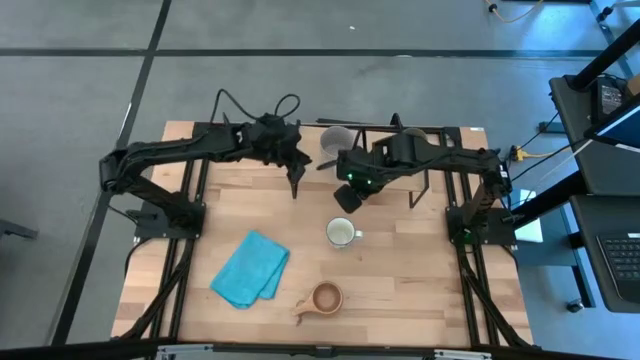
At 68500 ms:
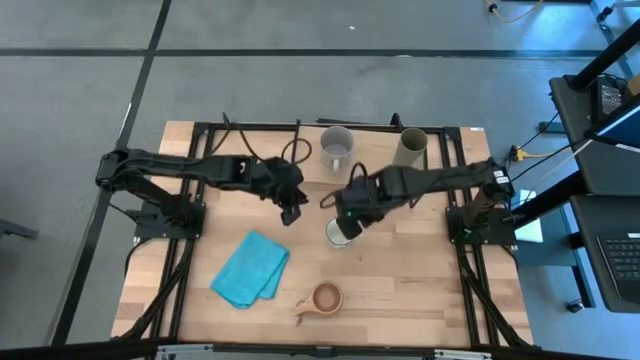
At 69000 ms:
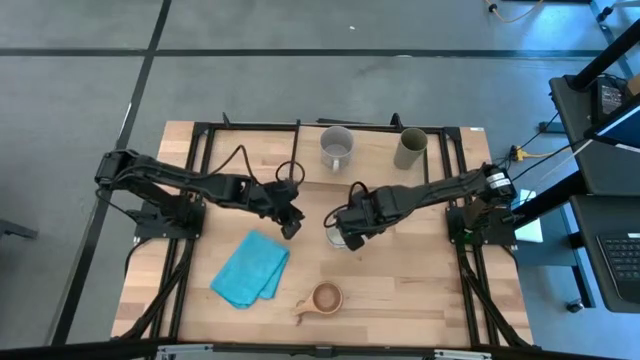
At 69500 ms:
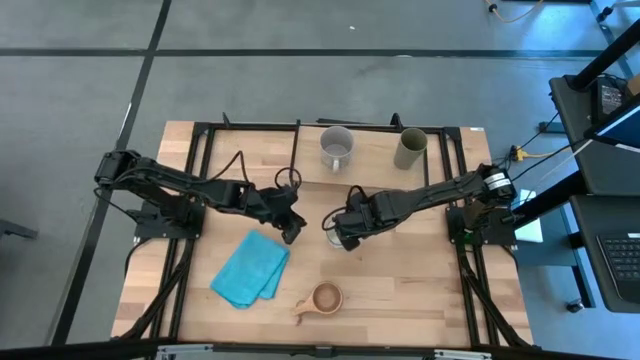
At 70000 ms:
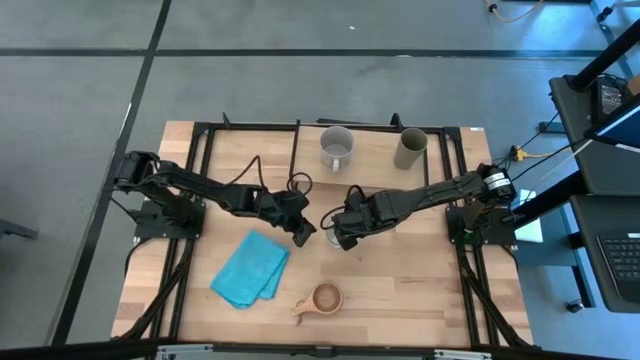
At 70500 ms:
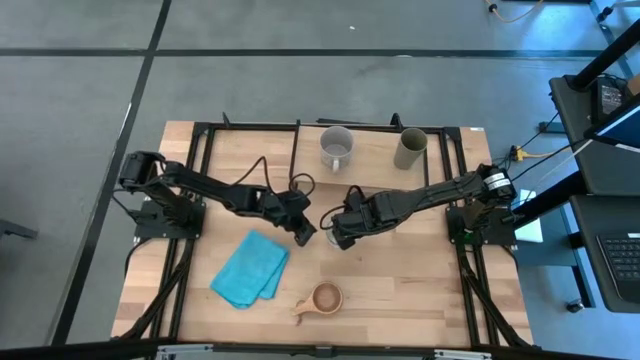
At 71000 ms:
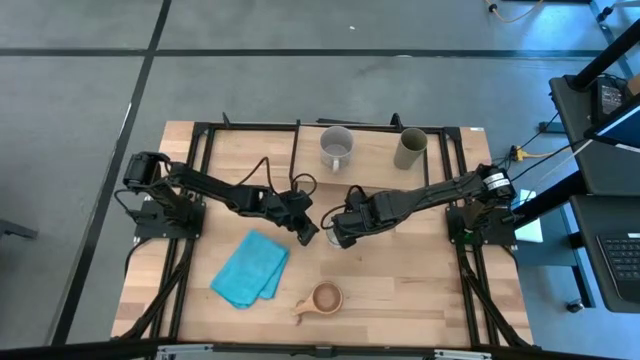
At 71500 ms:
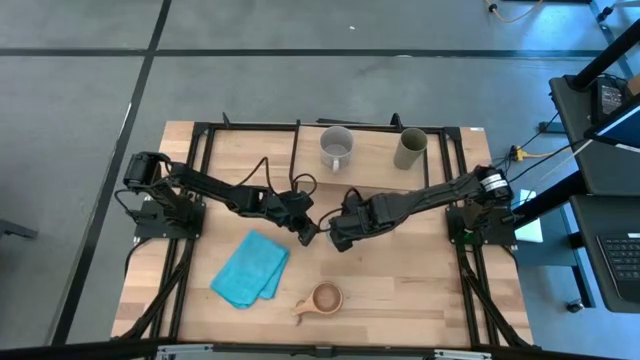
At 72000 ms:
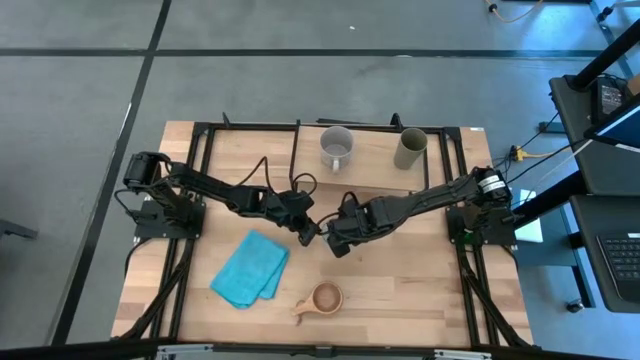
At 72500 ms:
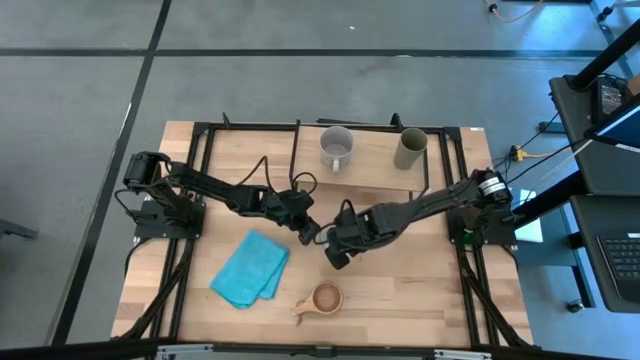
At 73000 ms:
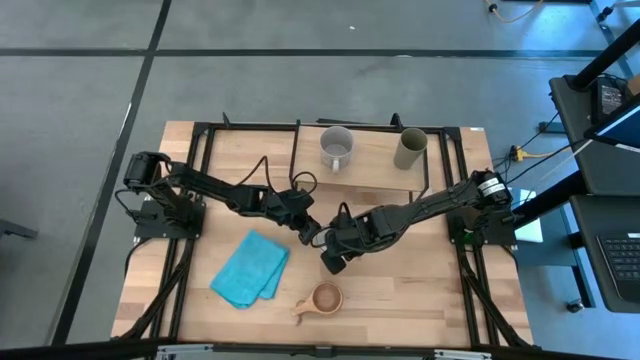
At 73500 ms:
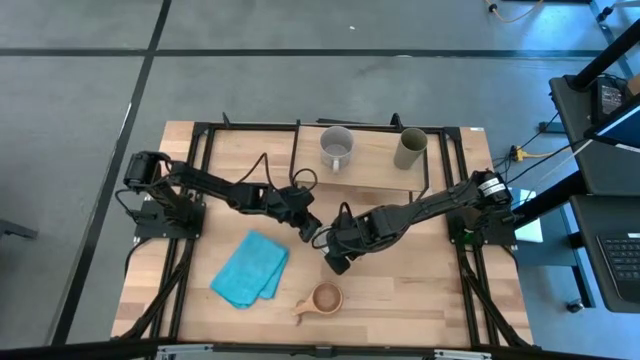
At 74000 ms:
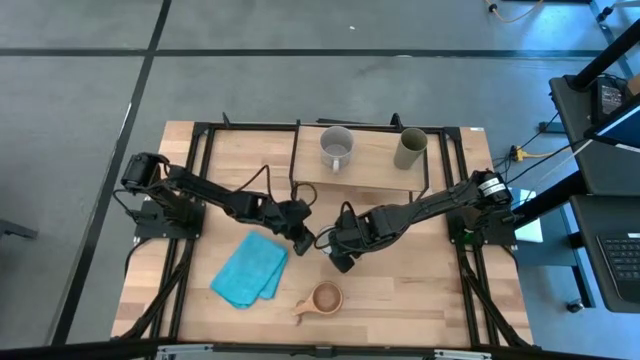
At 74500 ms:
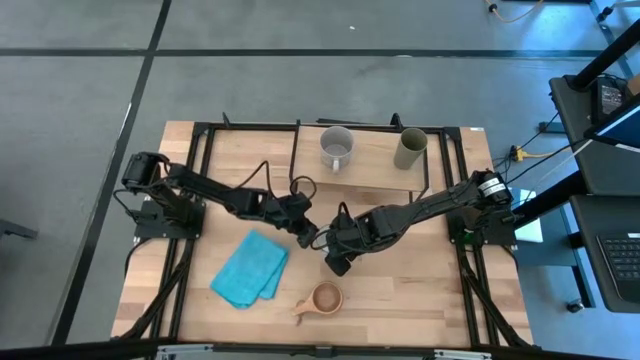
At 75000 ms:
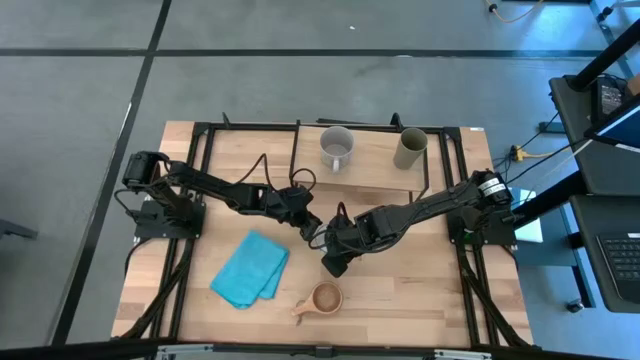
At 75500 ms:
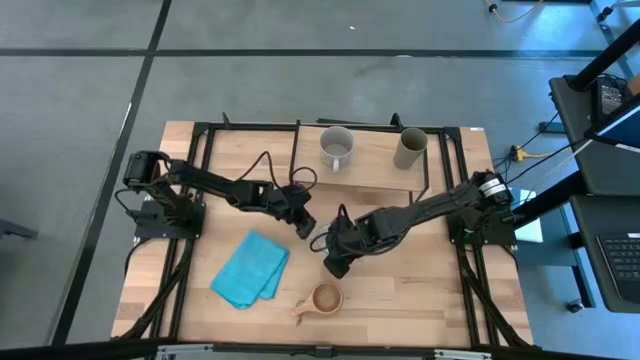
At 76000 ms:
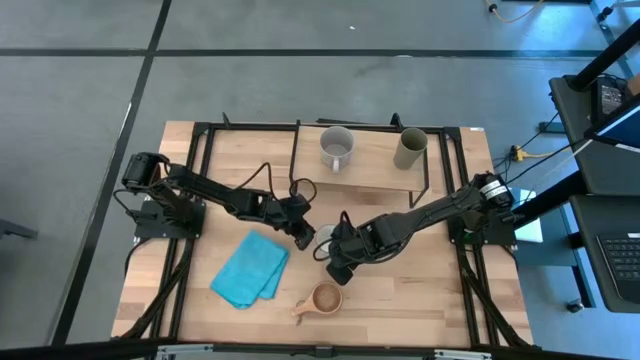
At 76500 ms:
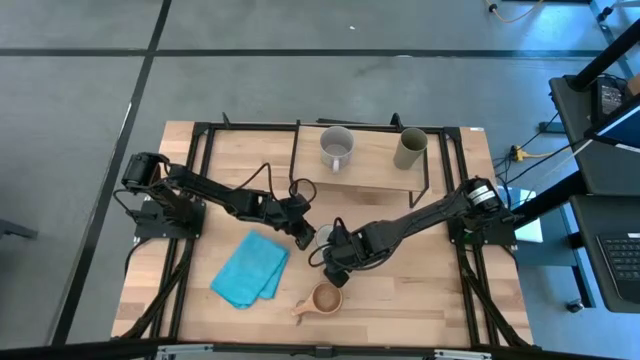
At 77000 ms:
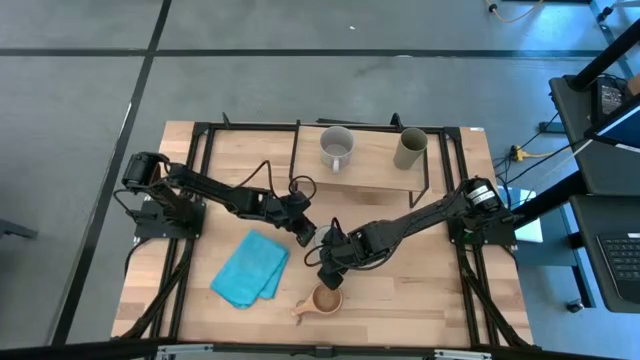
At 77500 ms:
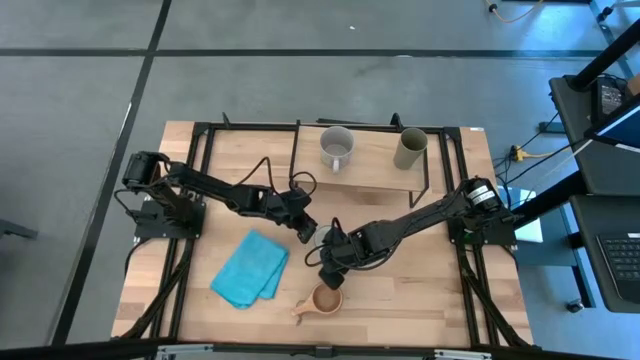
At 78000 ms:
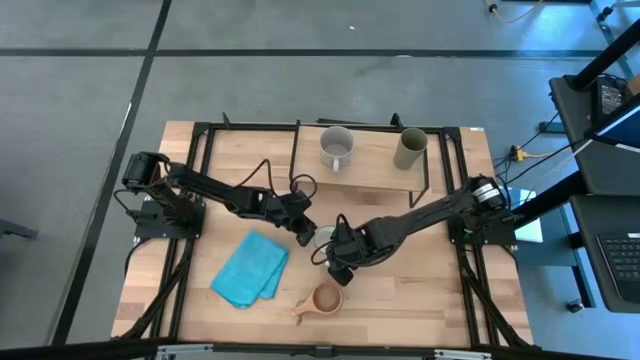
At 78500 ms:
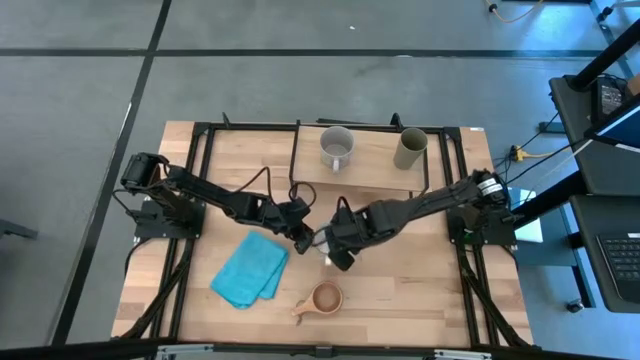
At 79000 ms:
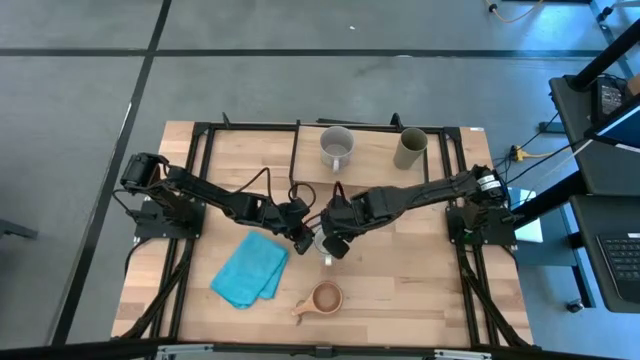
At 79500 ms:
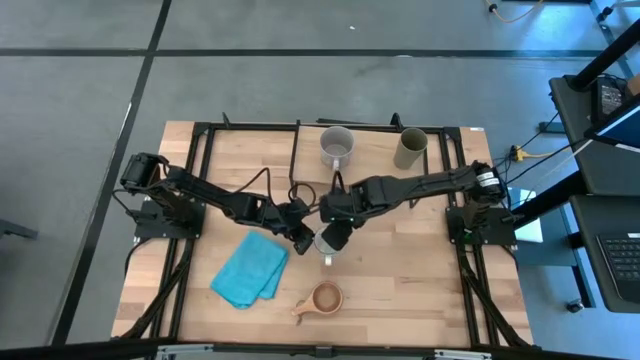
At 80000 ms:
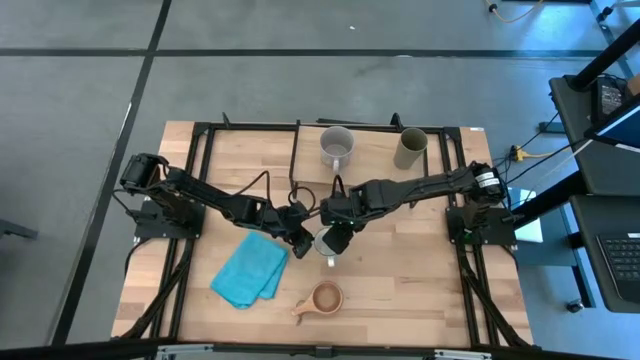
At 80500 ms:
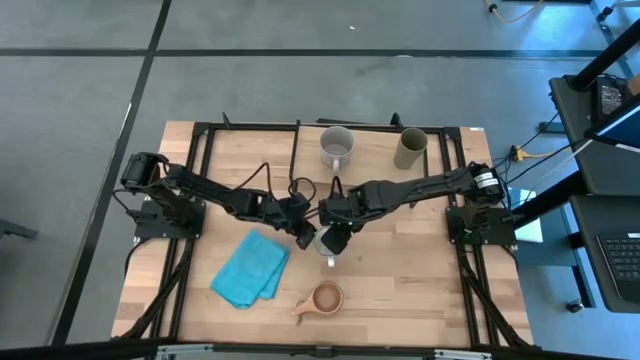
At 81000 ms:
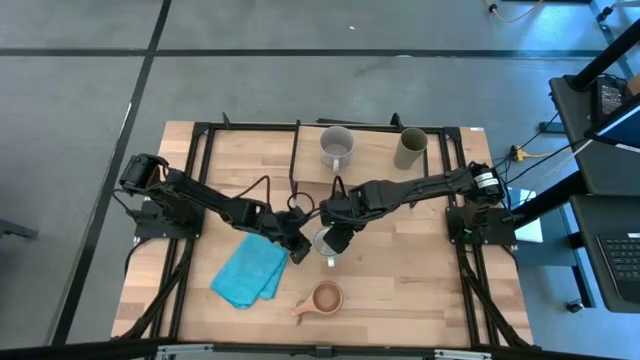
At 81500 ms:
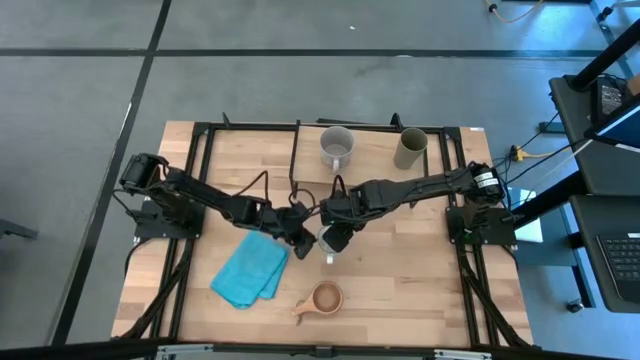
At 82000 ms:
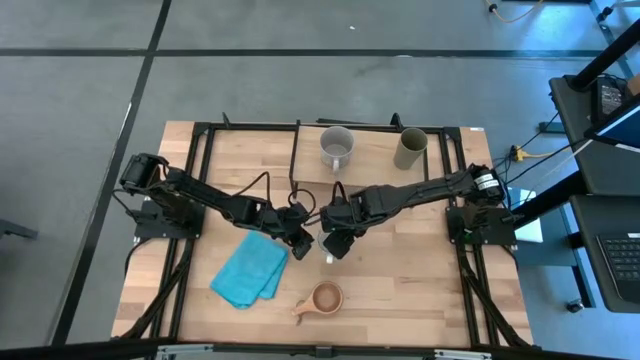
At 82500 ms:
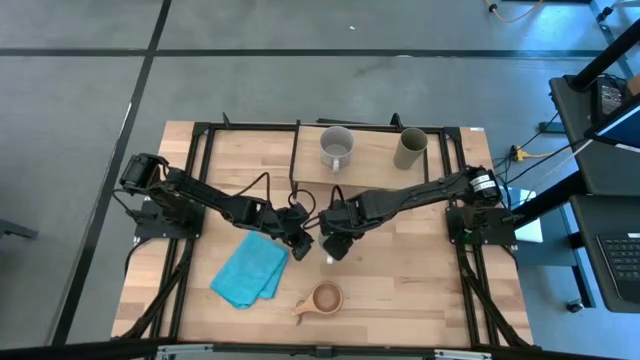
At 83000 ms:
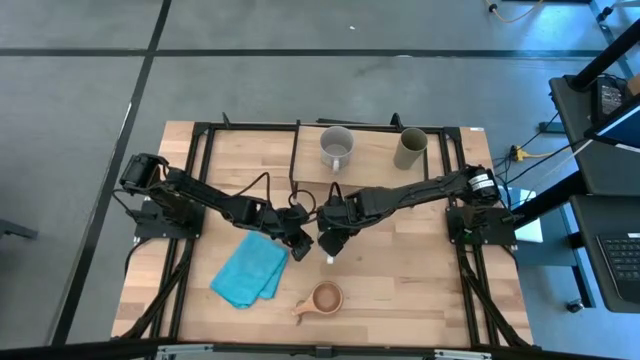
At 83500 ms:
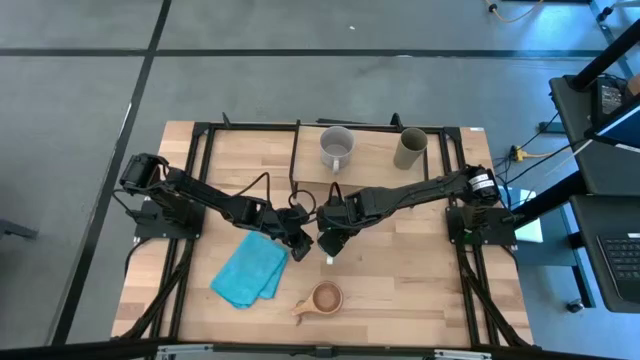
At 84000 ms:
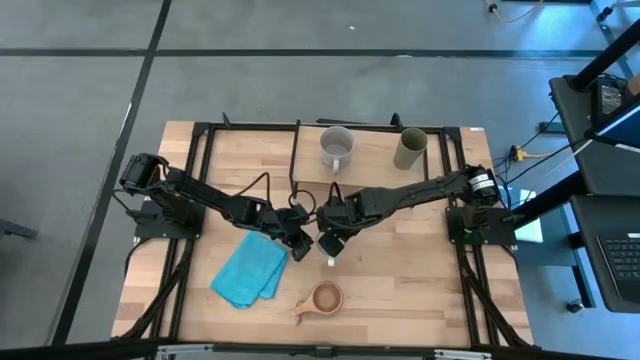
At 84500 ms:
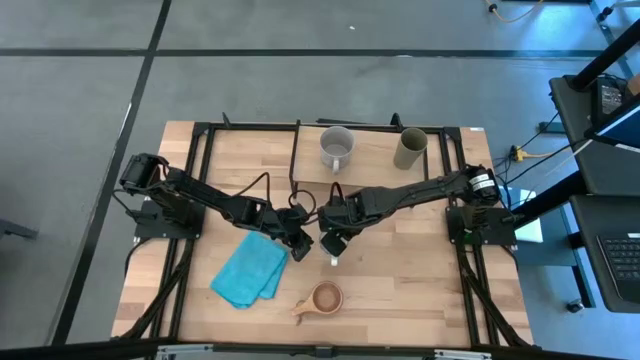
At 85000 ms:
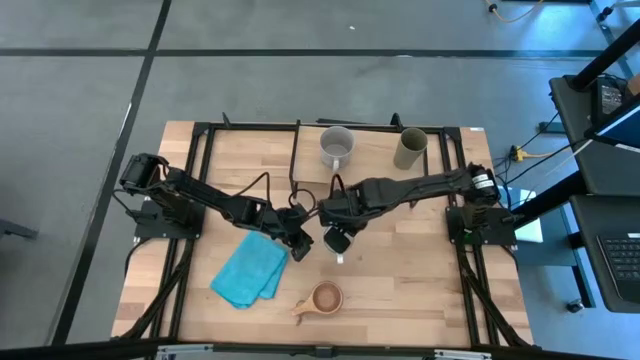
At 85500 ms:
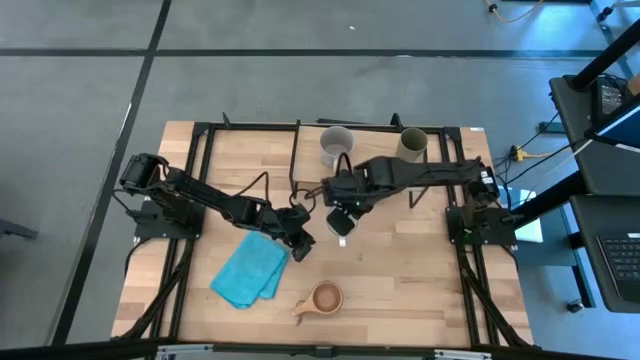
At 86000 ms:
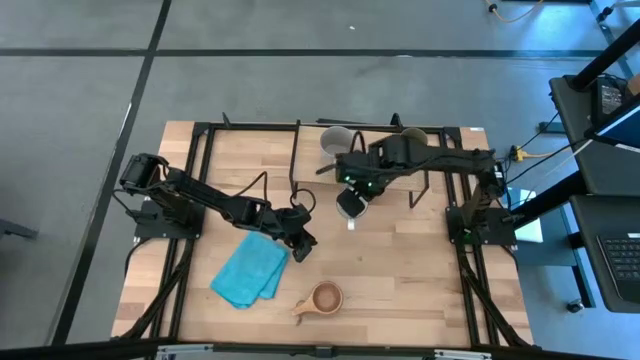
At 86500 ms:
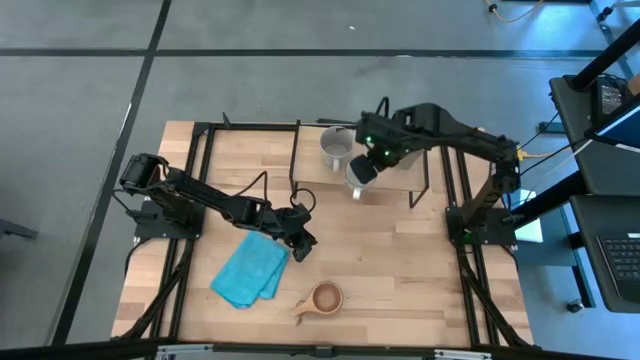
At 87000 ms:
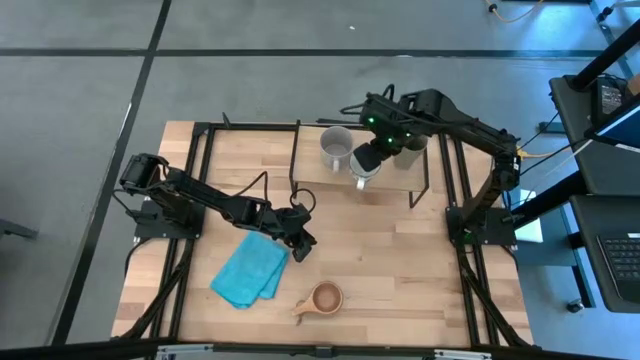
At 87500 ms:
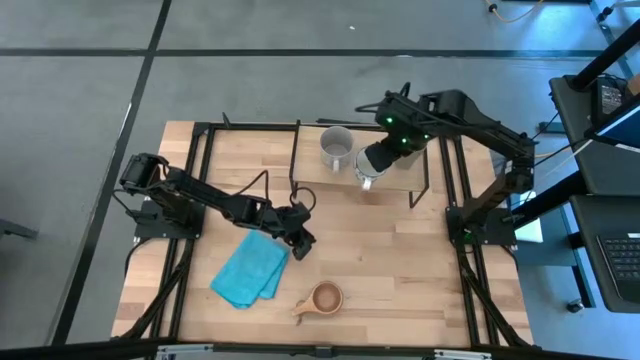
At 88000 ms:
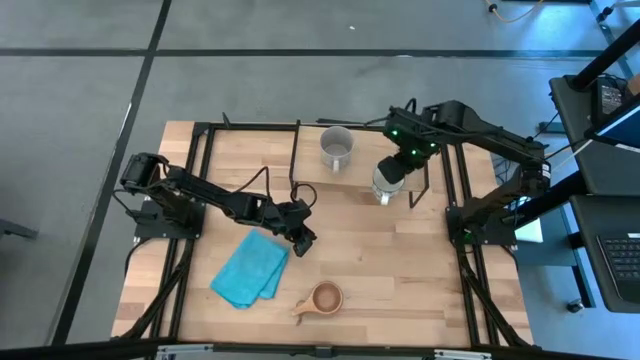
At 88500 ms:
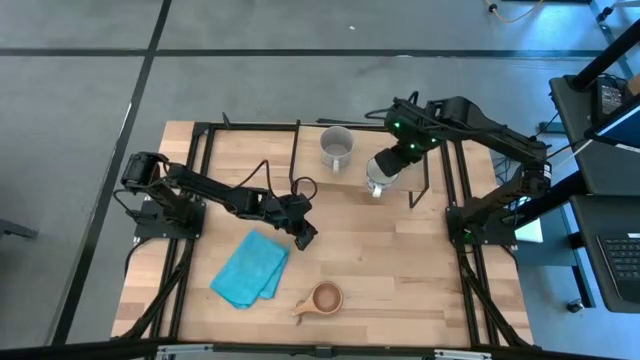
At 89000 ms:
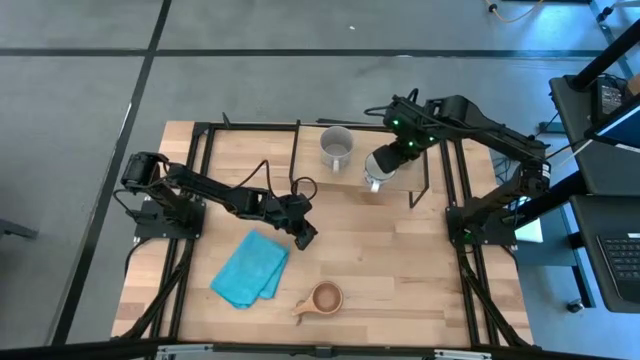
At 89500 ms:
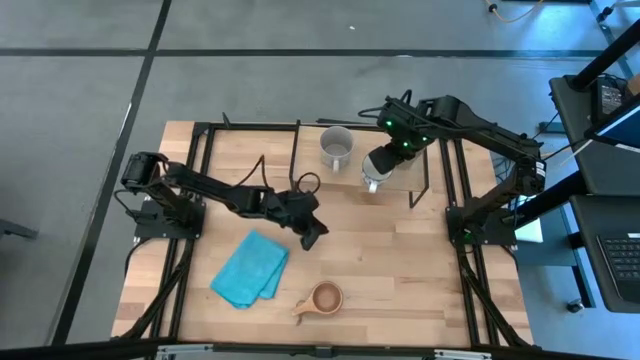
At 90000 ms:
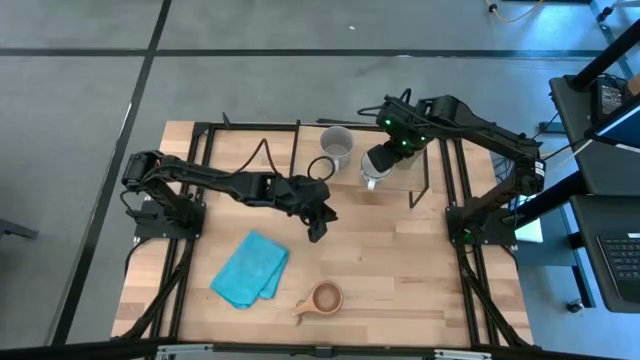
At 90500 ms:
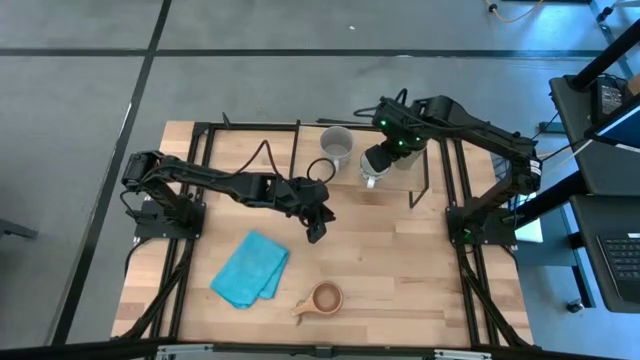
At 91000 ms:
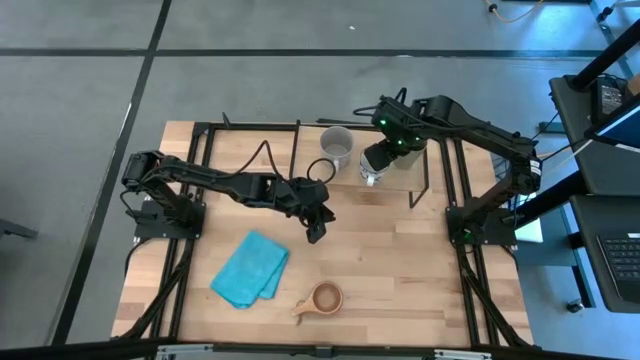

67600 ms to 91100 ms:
Task: Stack small to large cups/mugs on shelf
Put the blue mug on the shelf
